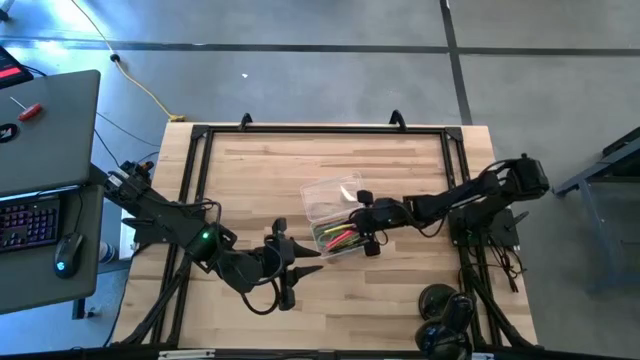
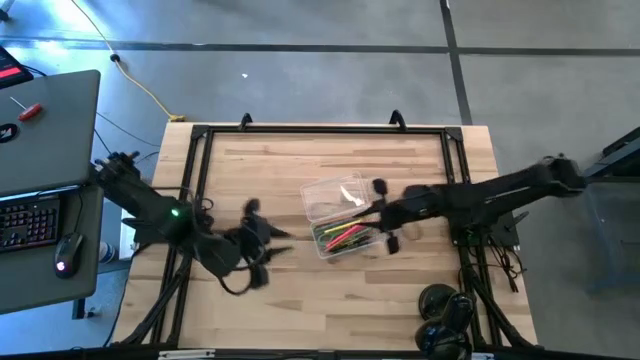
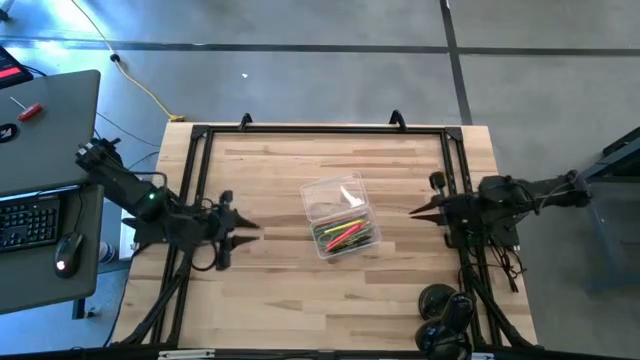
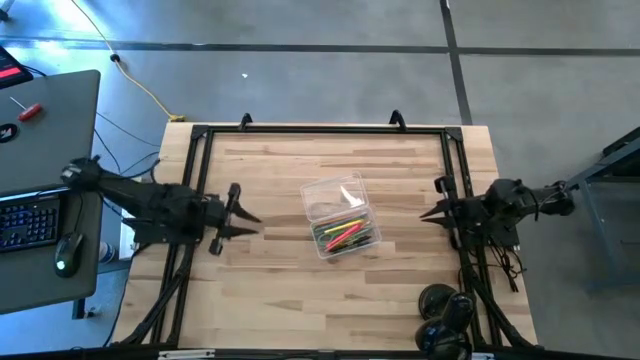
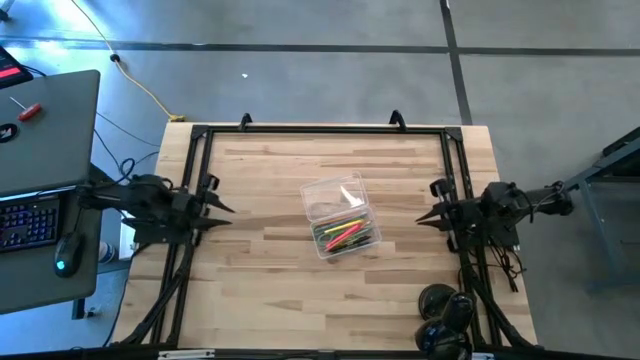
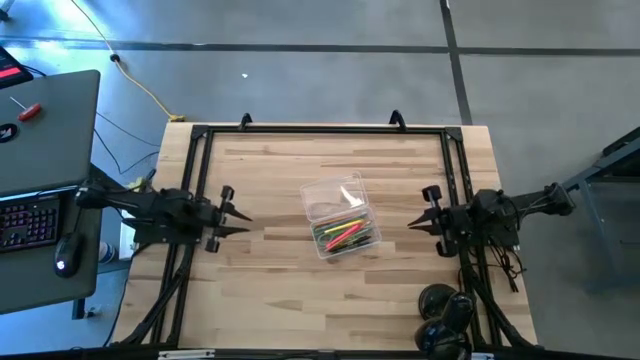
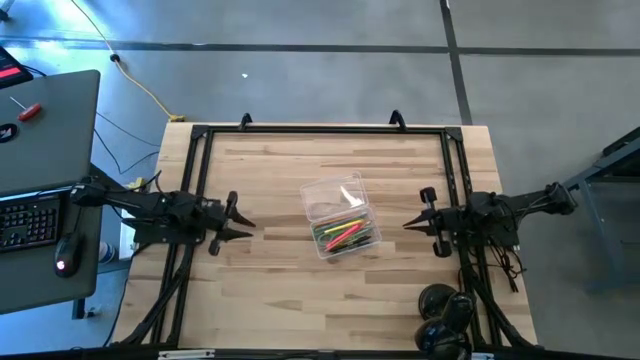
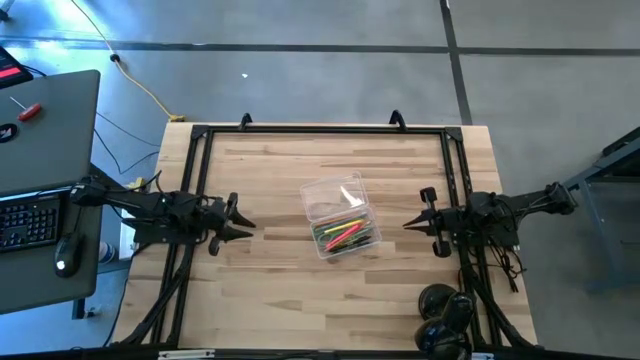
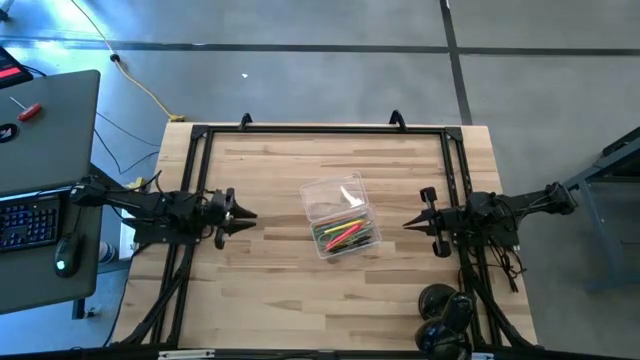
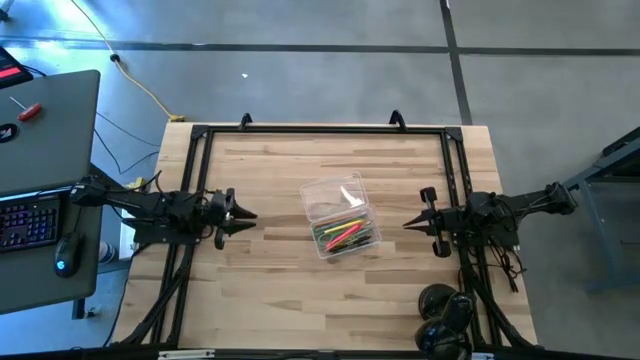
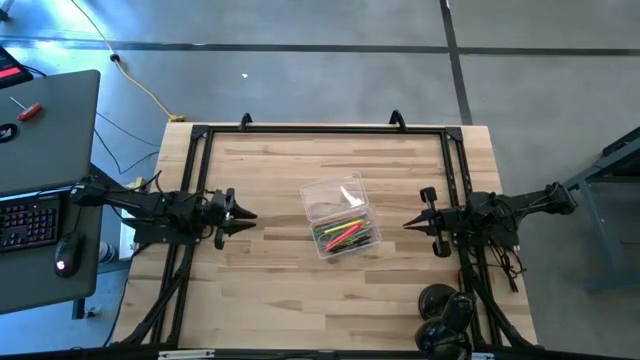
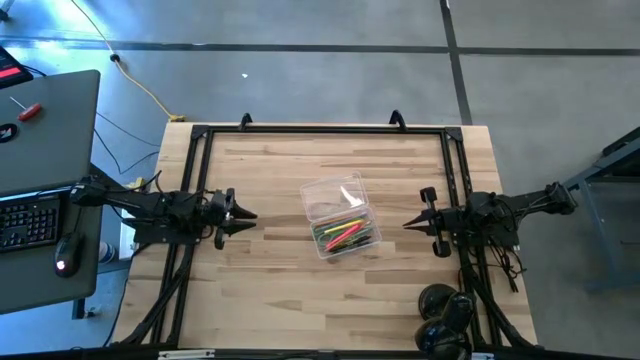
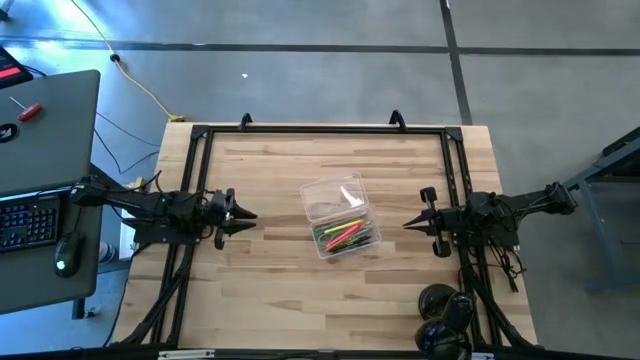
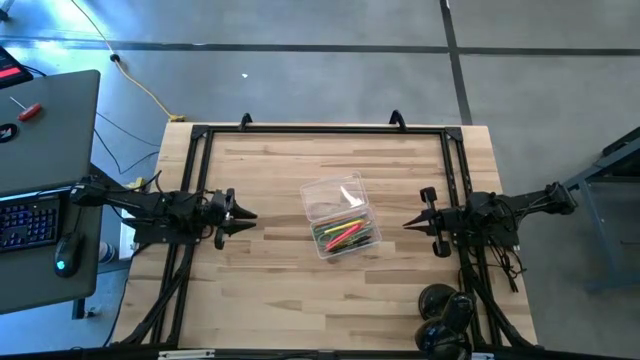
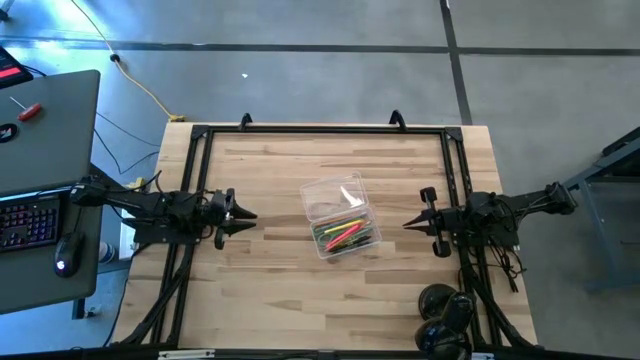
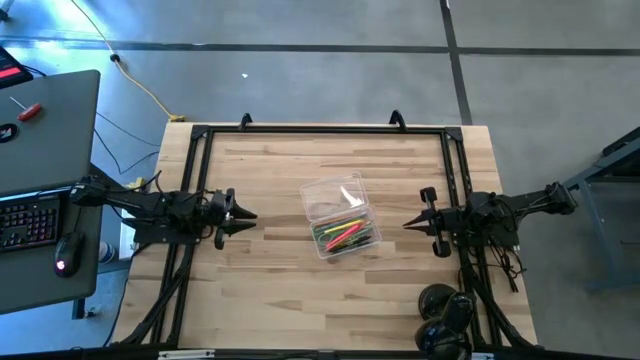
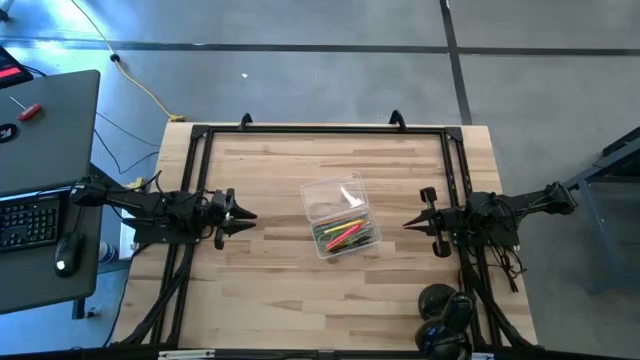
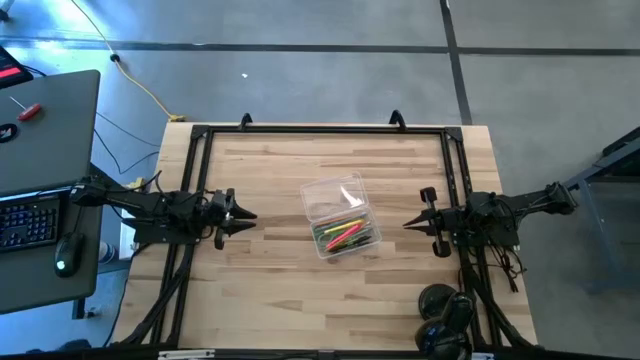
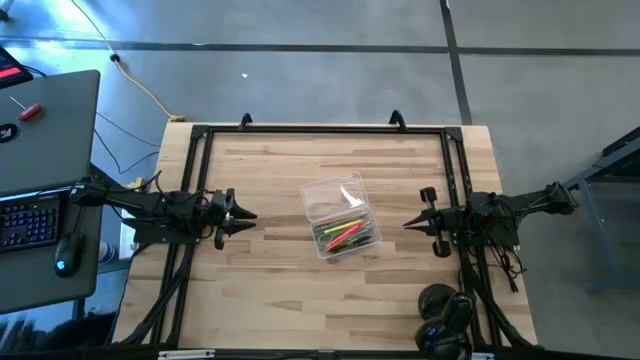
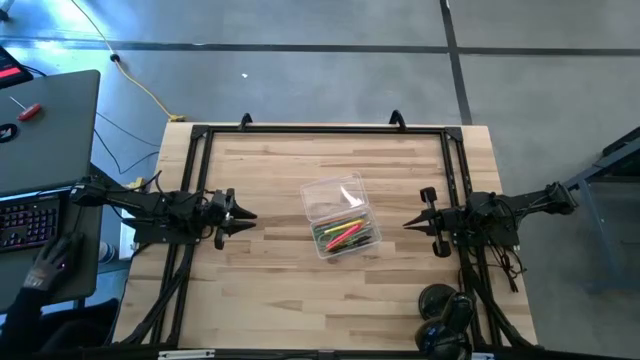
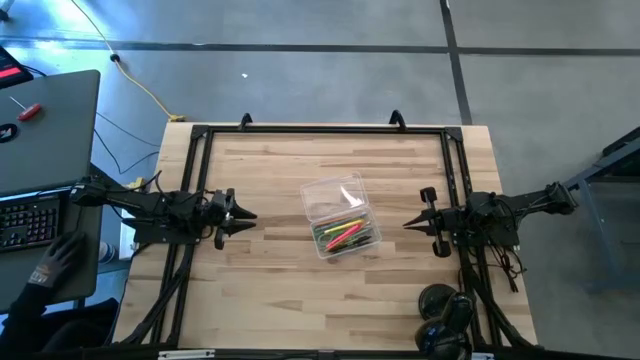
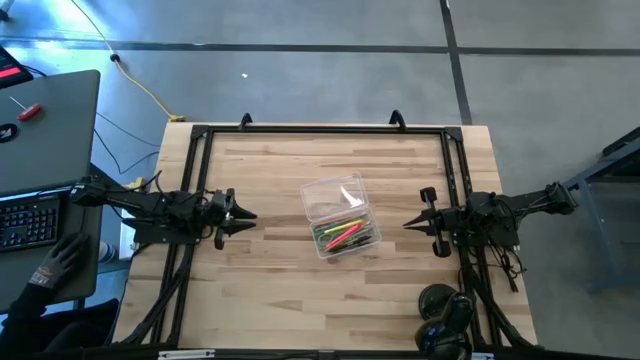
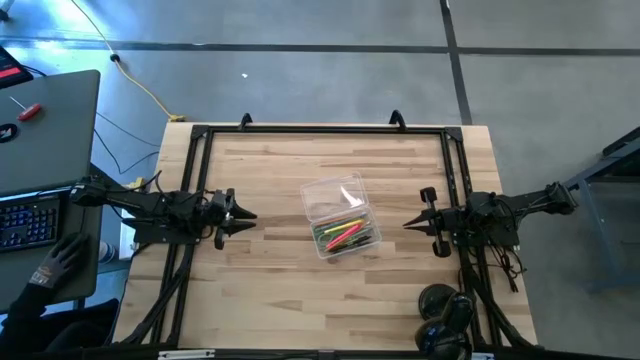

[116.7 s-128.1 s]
Task: Pick & place school supplies into a supply box
Return to Home Position

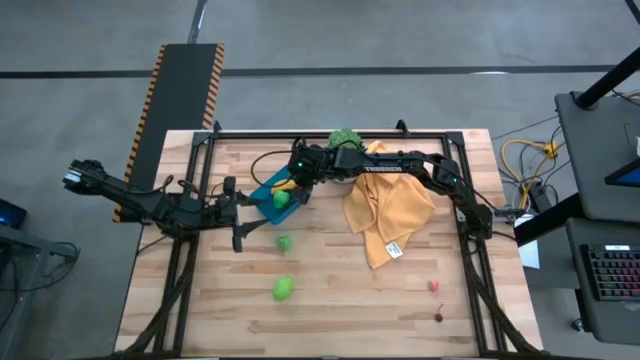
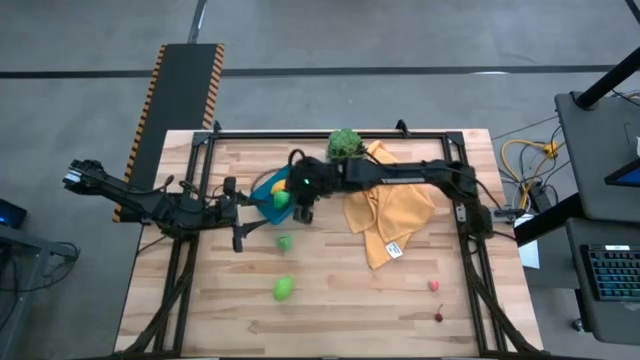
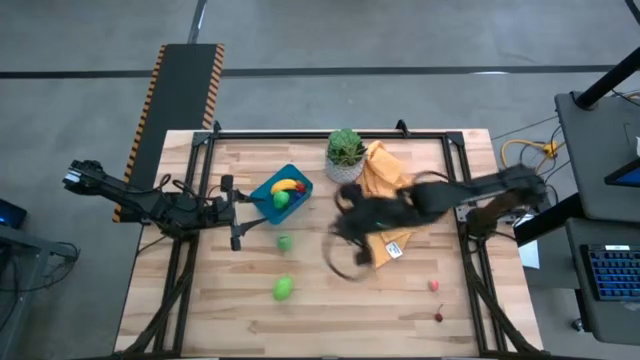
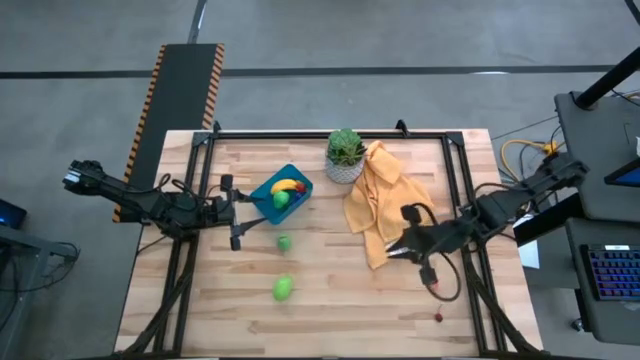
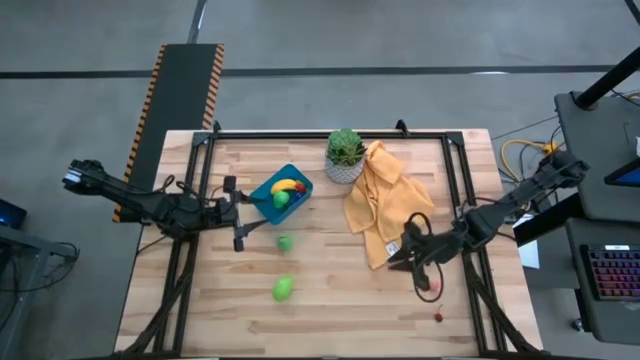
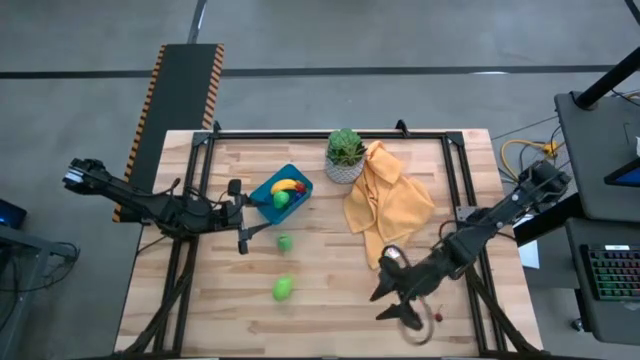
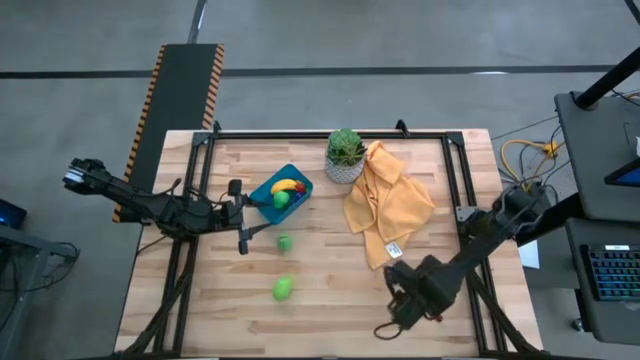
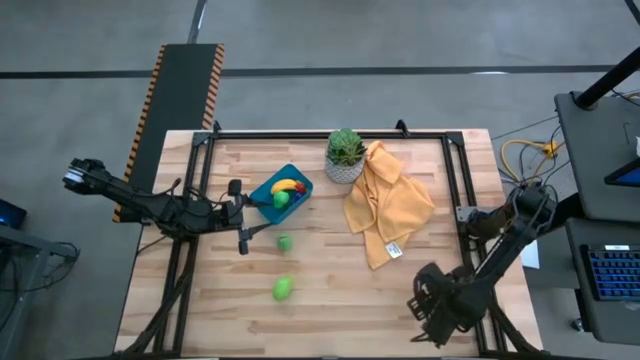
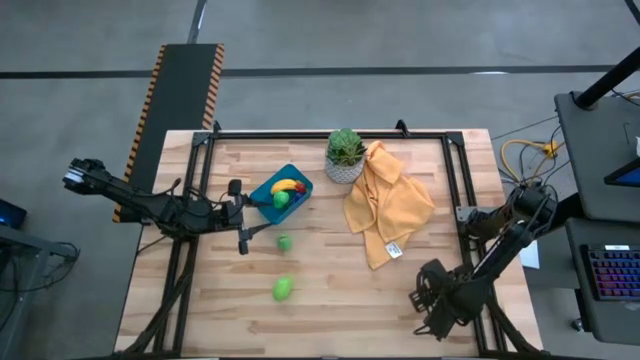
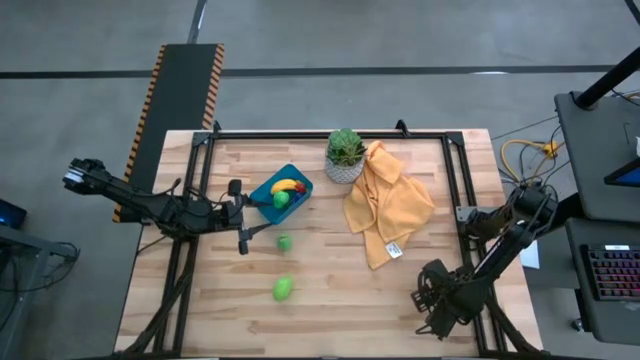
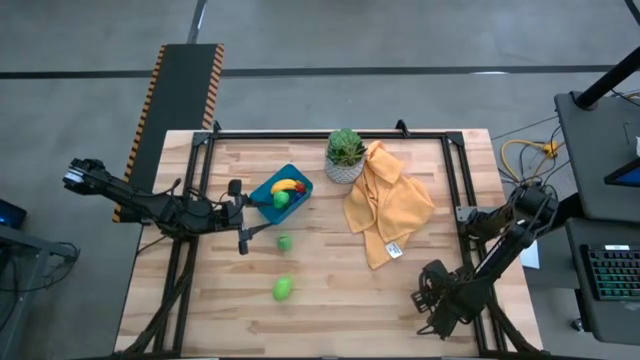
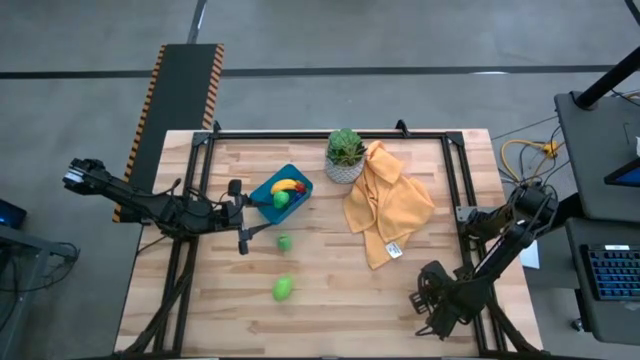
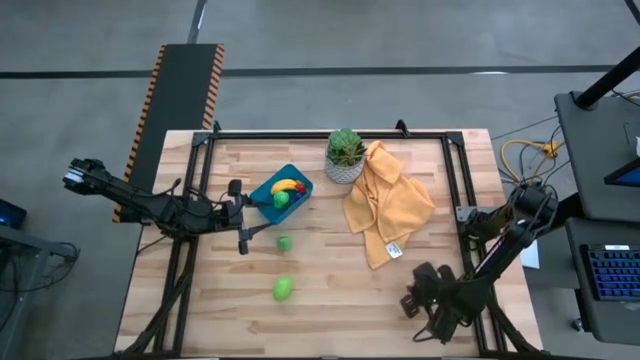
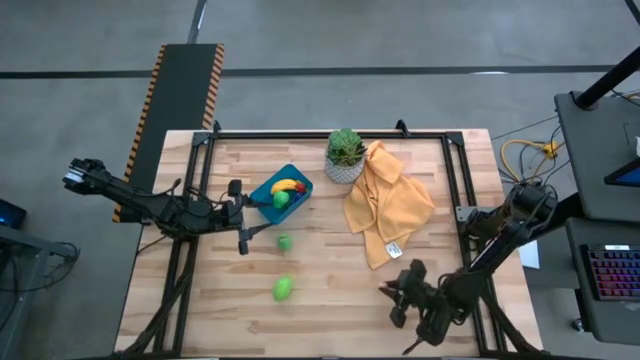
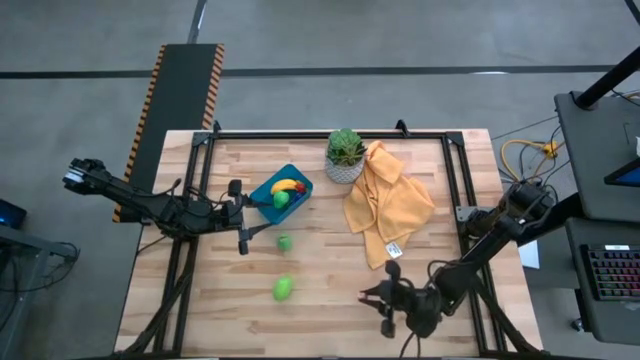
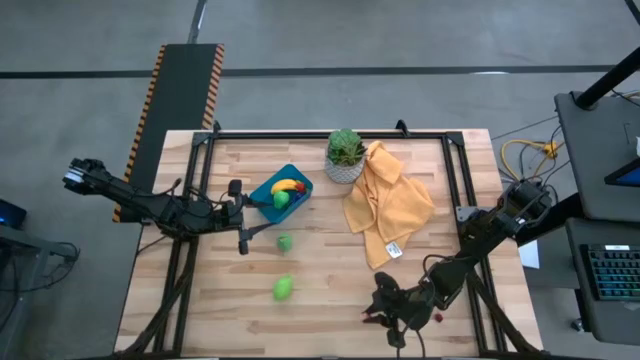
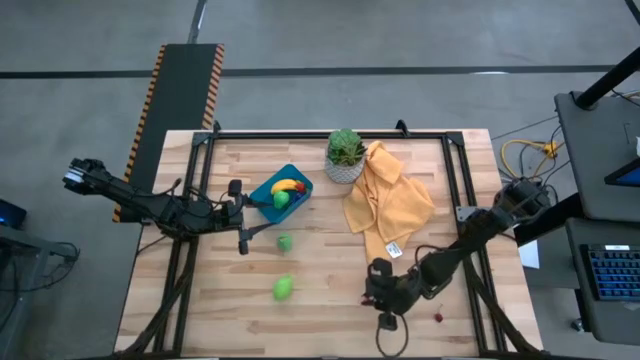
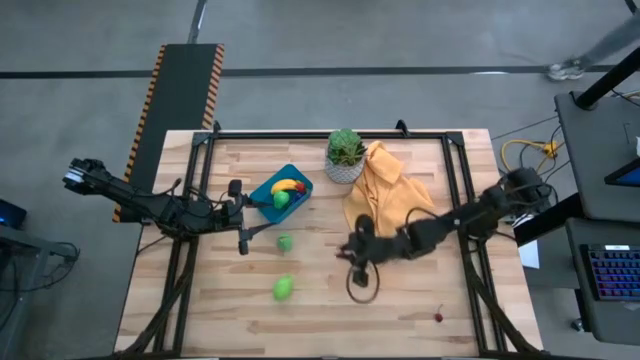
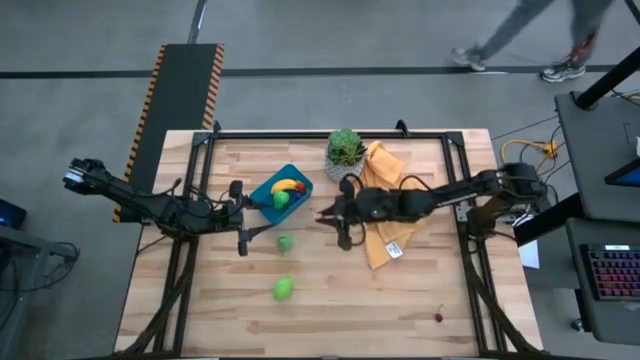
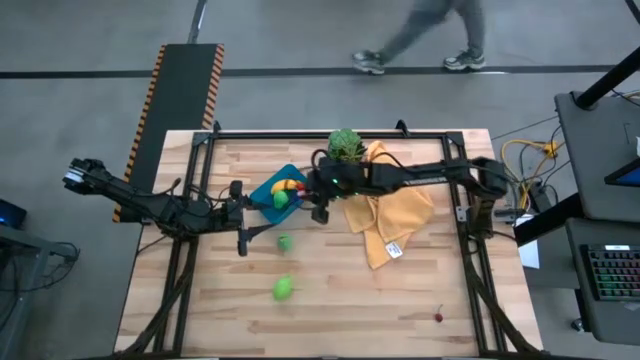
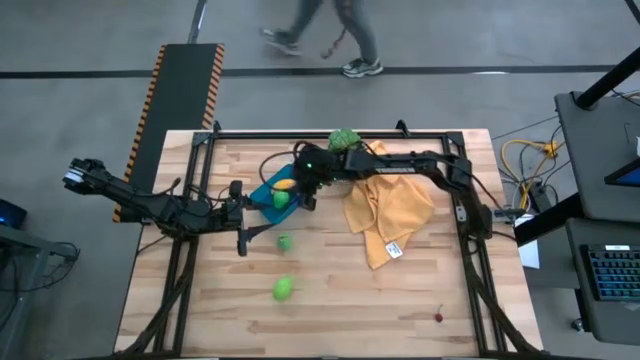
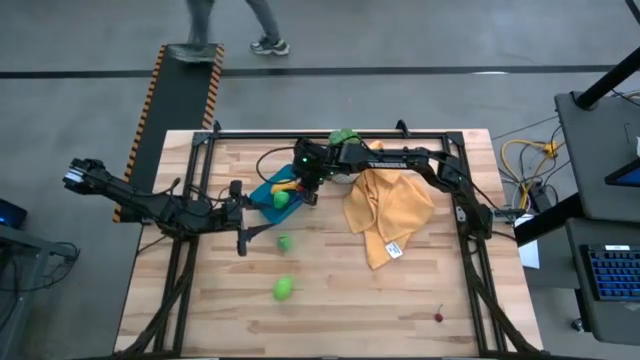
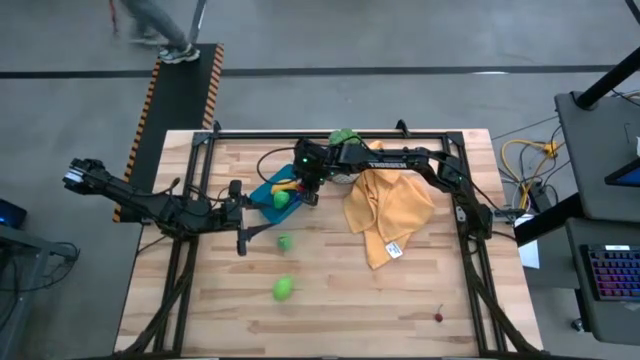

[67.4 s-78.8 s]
Task: Pick and placing Produce into tupperware
Put the pink peach into the blue bin
